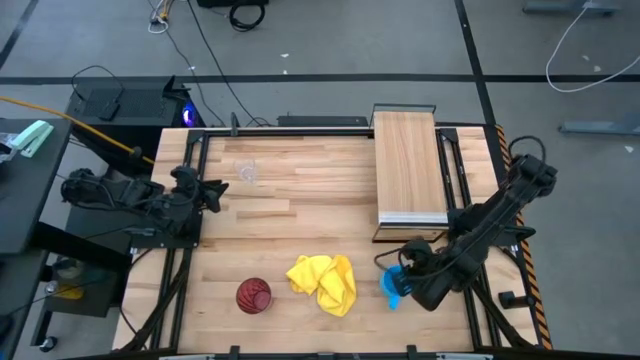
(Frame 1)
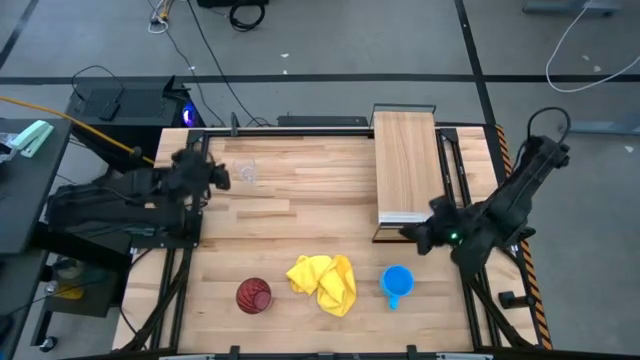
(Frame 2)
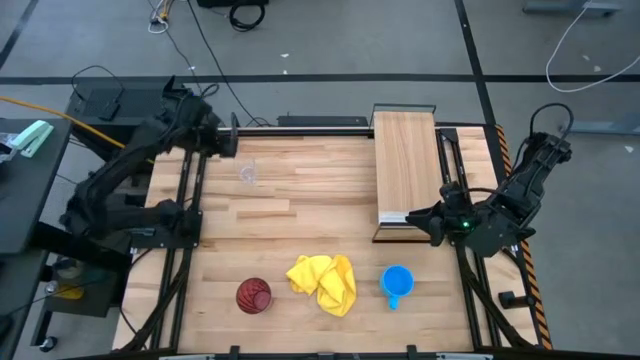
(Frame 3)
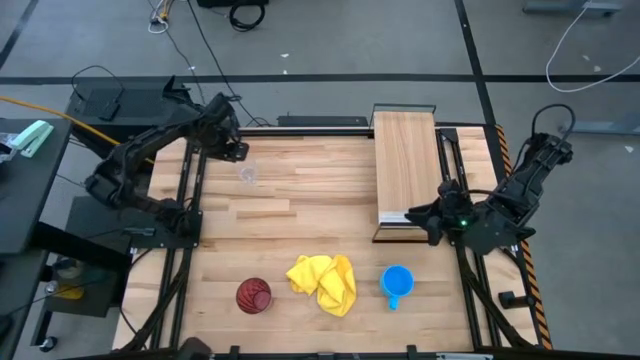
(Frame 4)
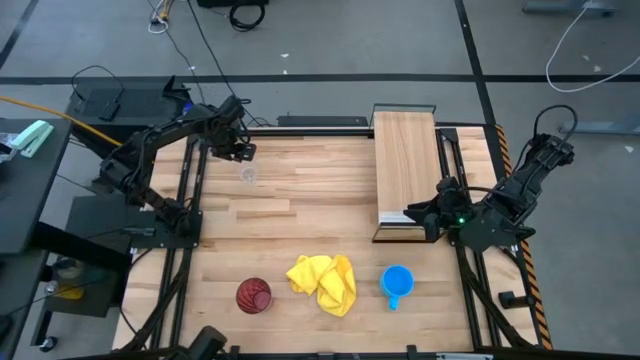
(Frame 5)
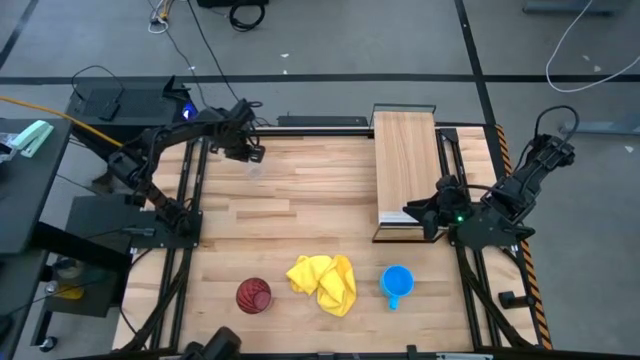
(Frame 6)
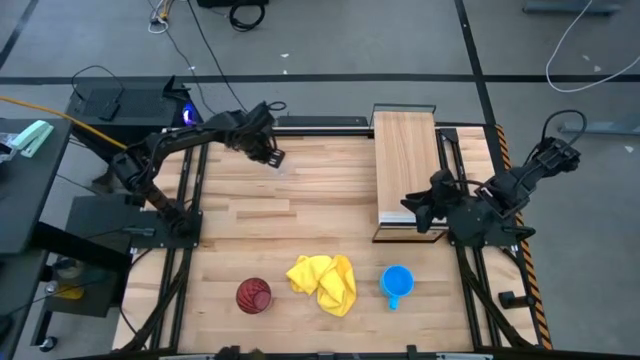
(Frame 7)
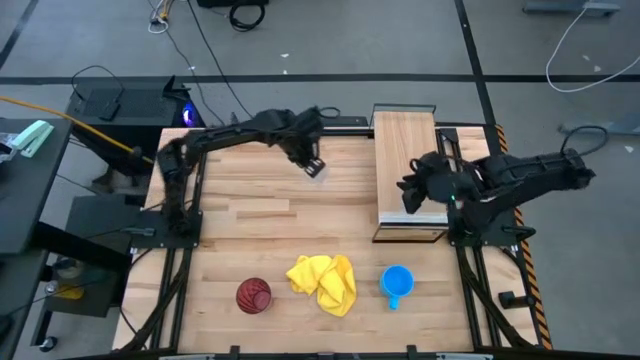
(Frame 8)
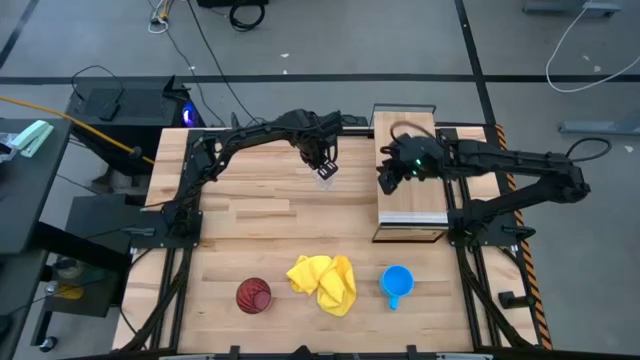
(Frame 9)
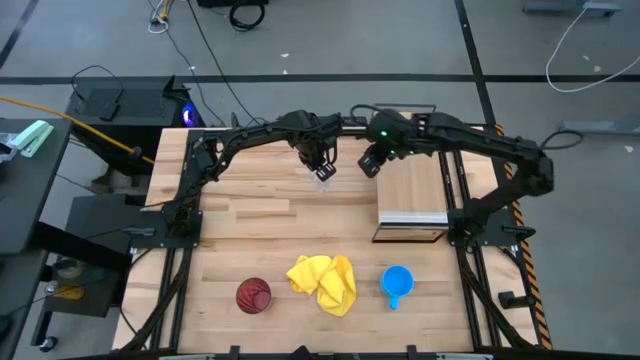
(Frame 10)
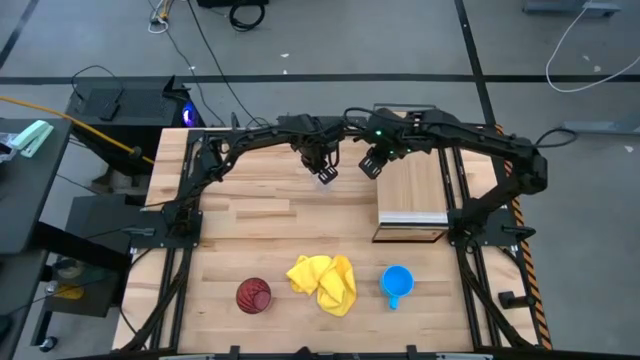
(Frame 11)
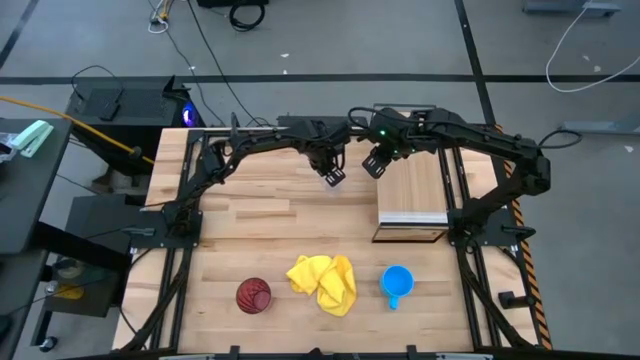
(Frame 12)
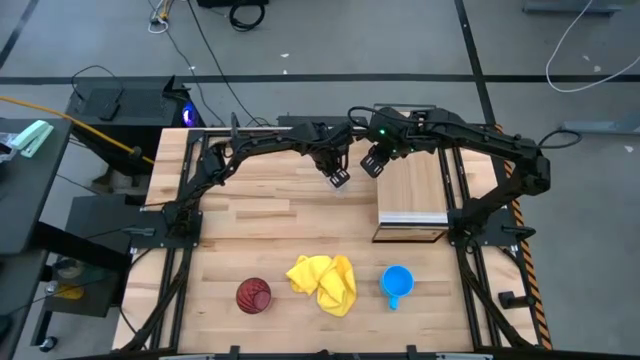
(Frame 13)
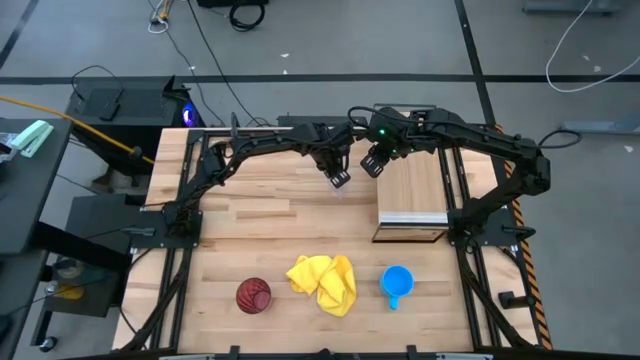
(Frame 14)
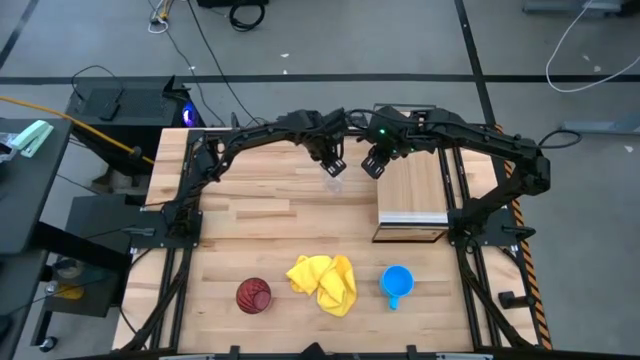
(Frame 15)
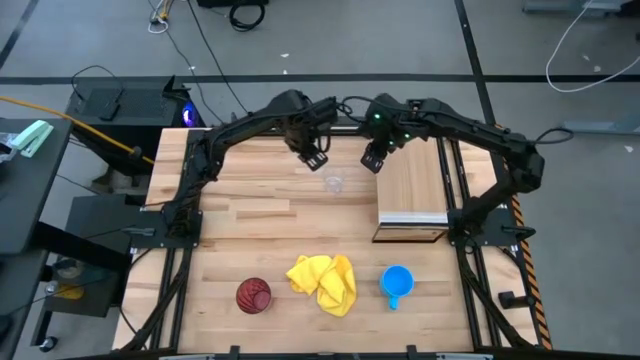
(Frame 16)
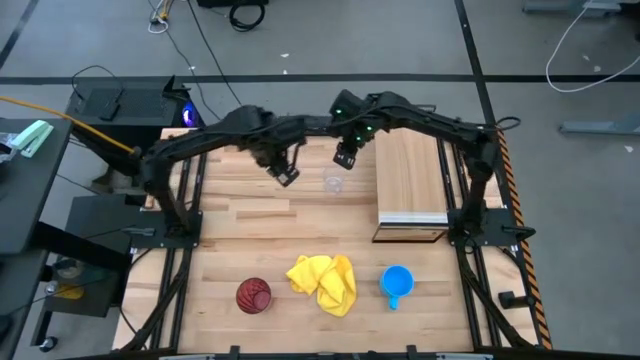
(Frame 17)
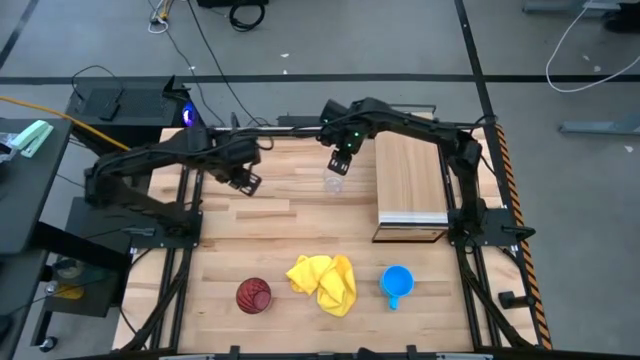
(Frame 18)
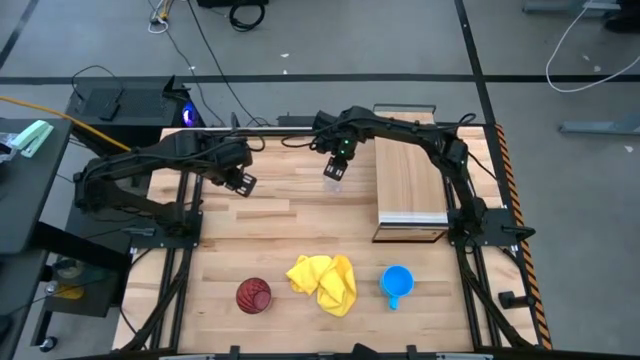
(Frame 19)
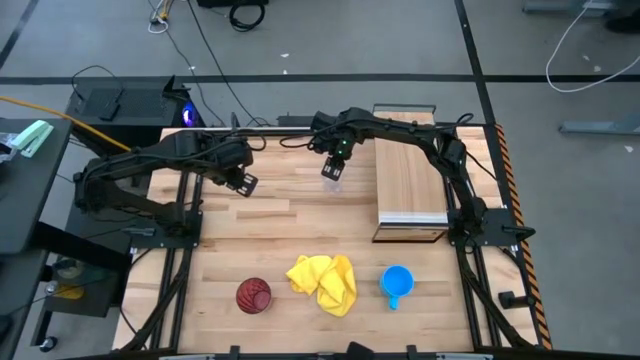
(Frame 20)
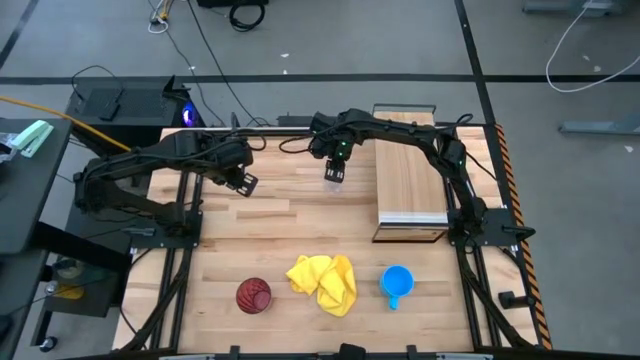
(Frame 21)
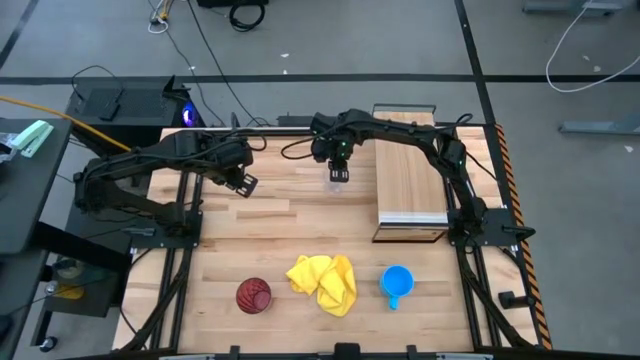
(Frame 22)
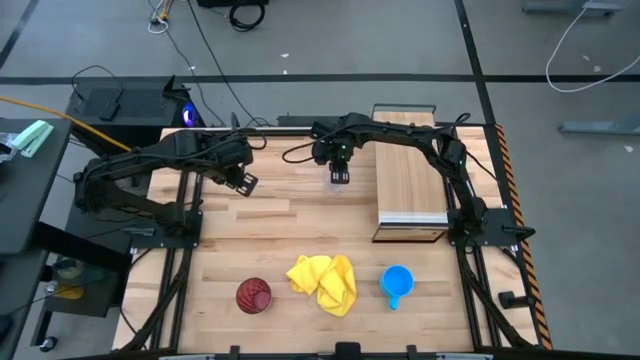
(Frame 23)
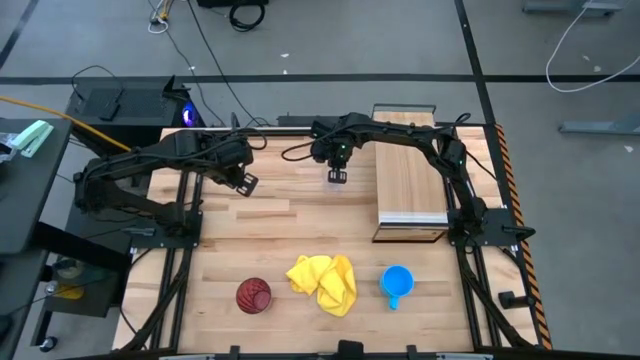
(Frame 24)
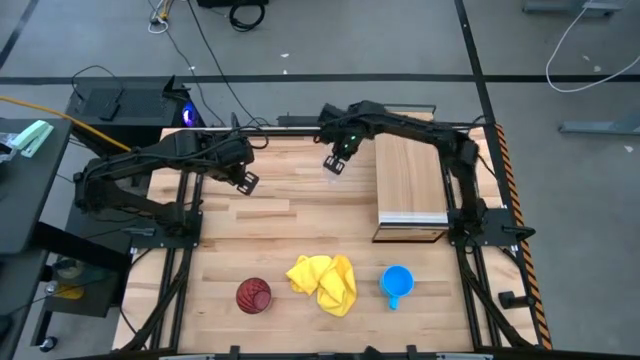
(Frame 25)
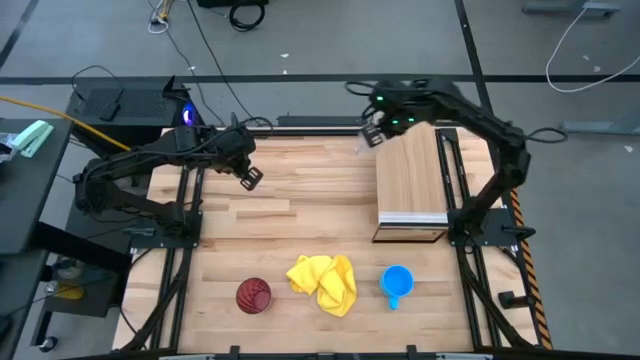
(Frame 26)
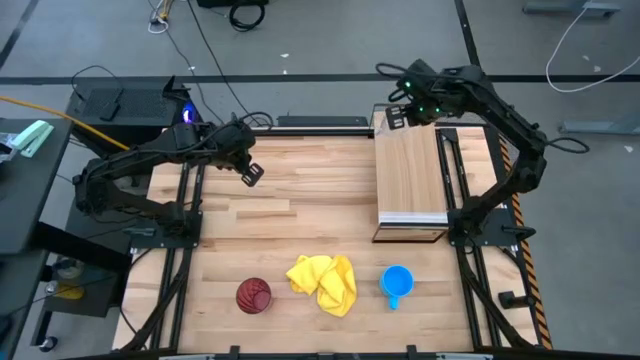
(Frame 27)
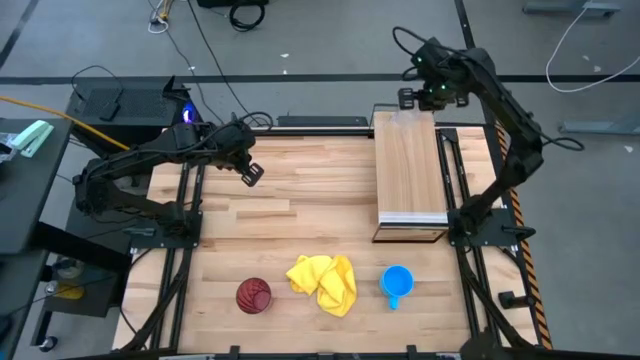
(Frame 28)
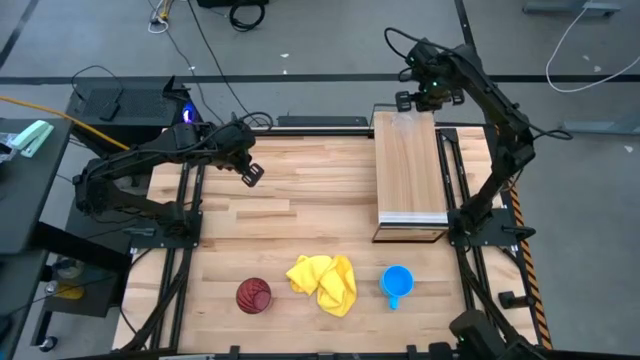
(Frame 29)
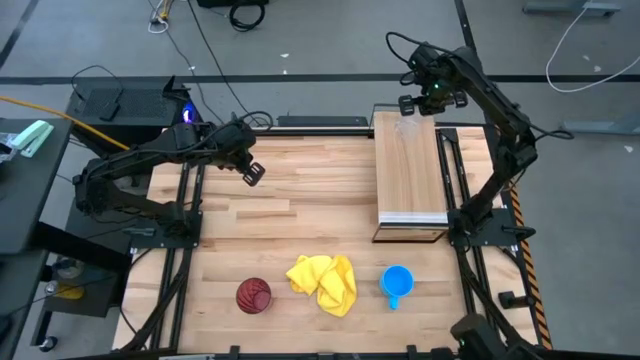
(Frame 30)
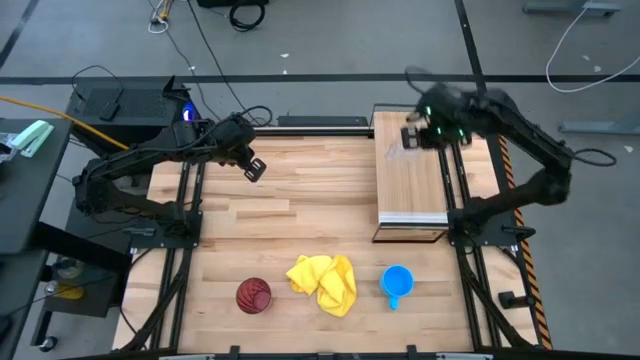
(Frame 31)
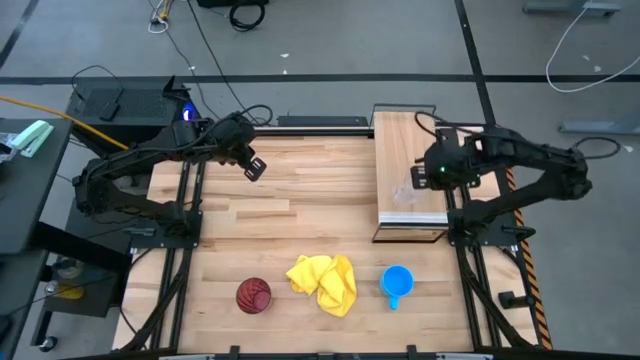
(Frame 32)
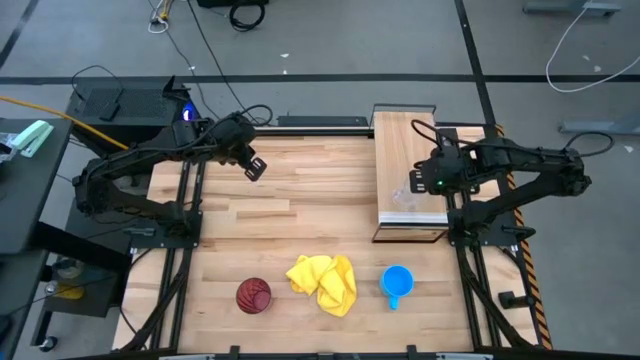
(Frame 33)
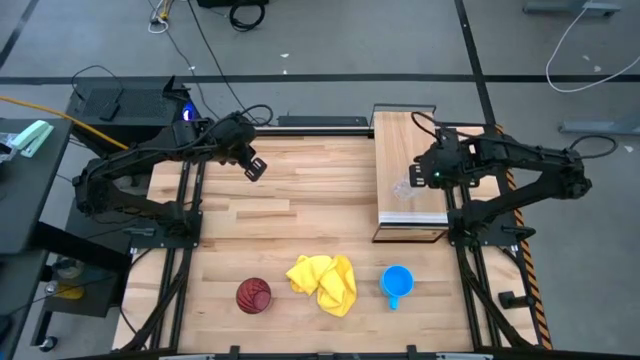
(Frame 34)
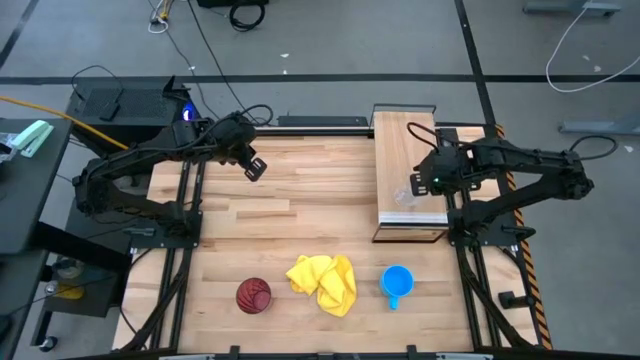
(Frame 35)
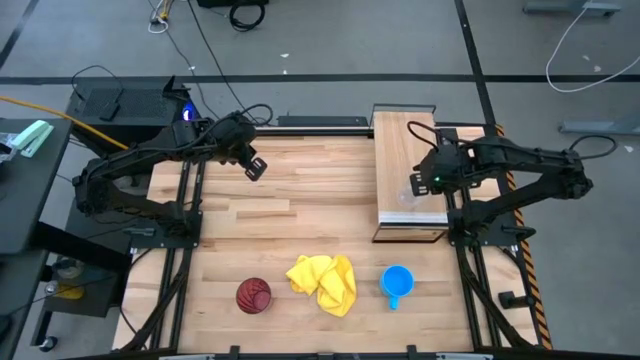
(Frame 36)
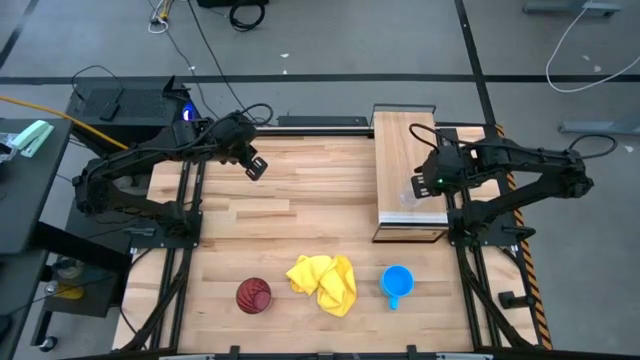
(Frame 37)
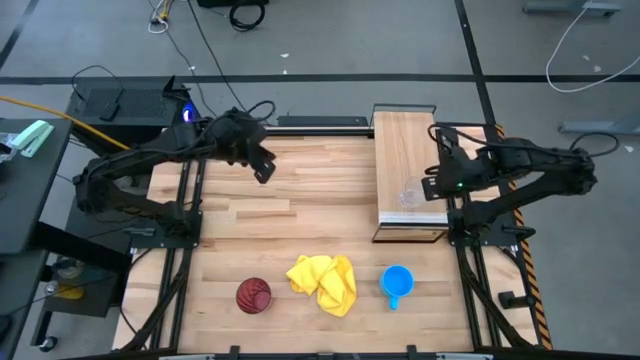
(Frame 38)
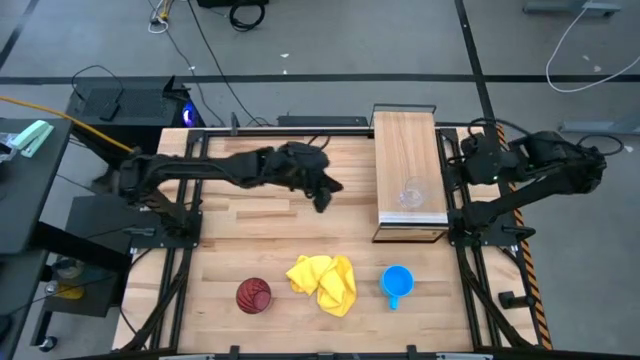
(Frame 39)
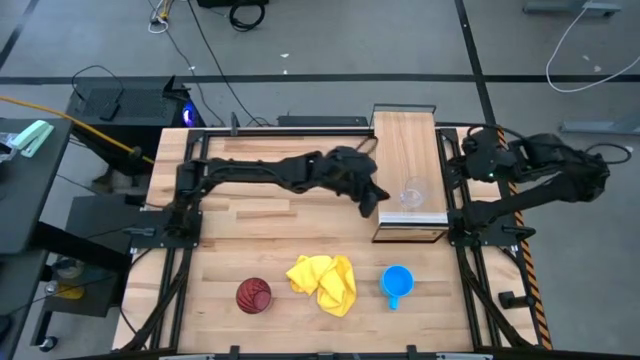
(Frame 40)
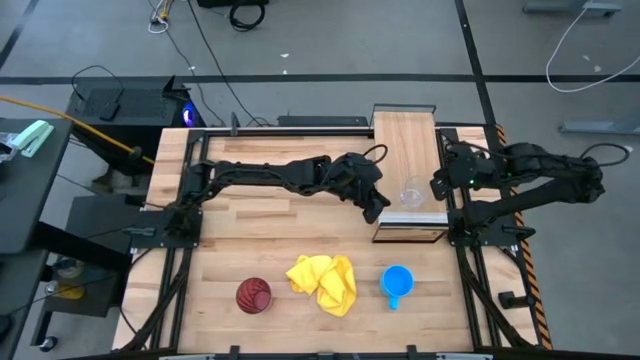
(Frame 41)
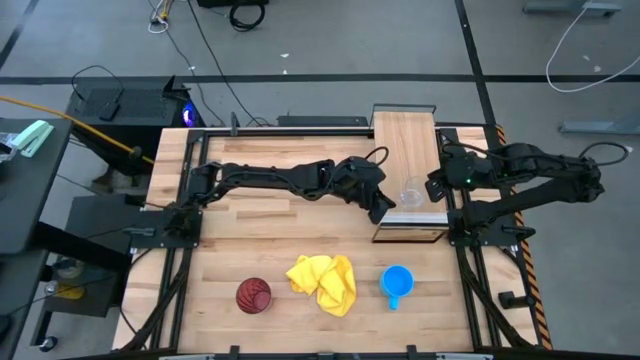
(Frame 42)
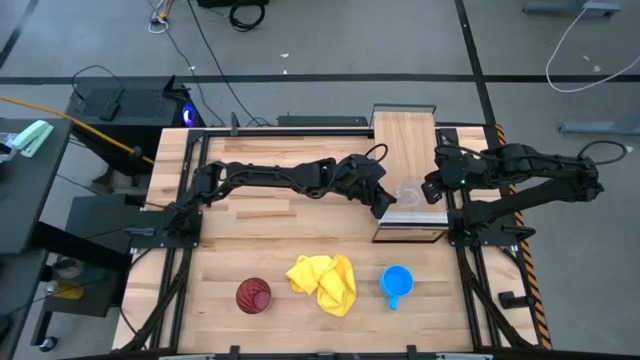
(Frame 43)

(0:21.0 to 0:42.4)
Task: Stack small to large cups/mugs on shelf
Put the transparent mug on the shelf

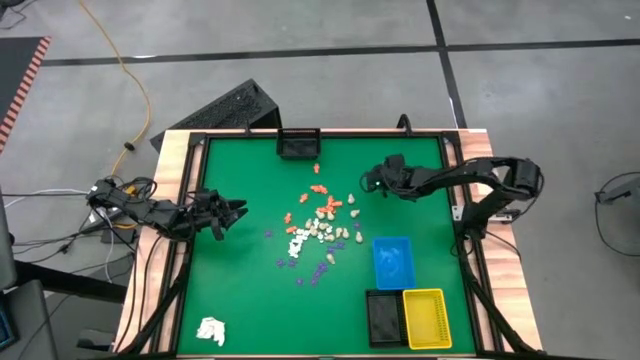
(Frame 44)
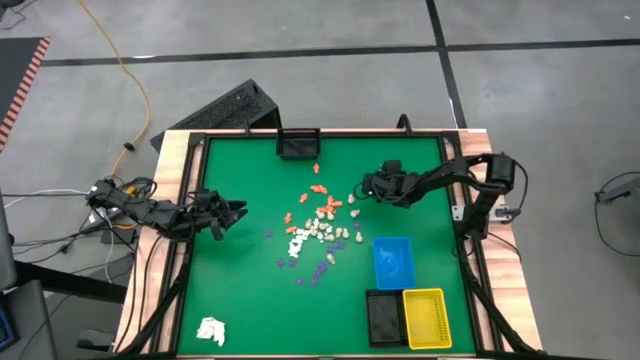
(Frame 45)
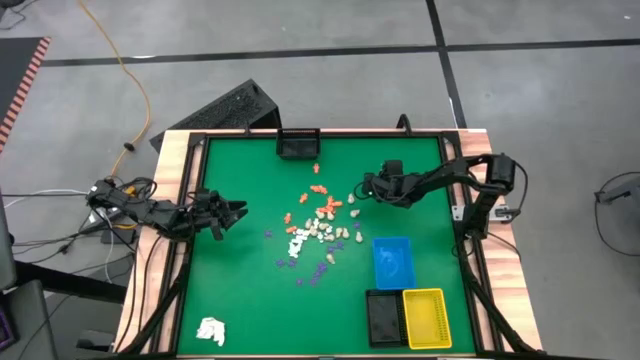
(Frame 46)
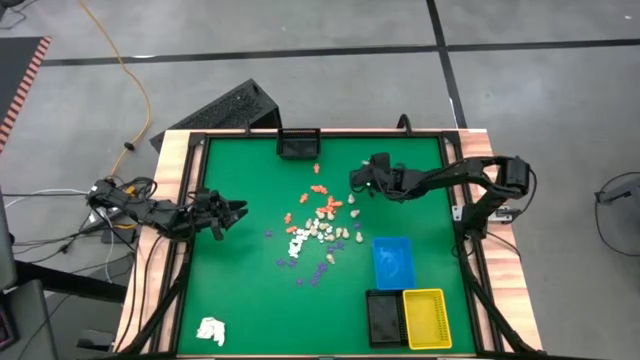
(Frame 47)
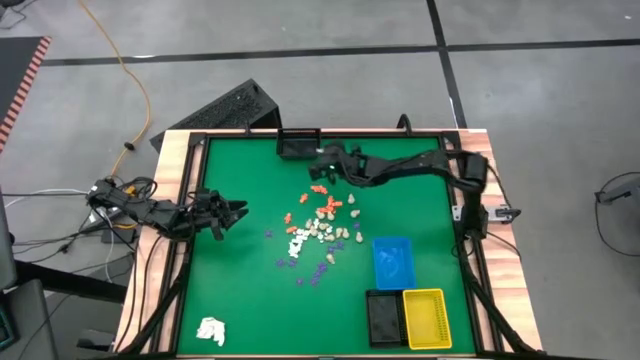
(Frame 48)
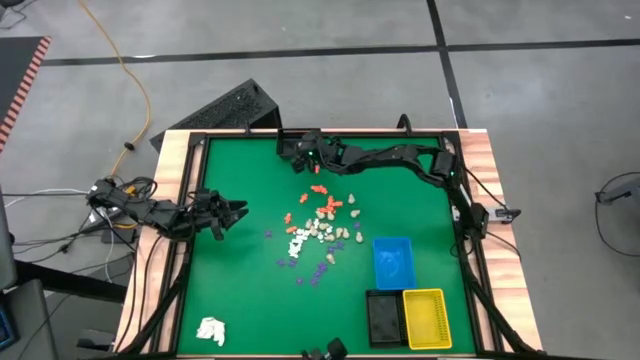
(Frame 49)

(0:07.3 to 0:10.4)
Task: Sort Halloween decoration
Put the gray skull toy into the top black bin
